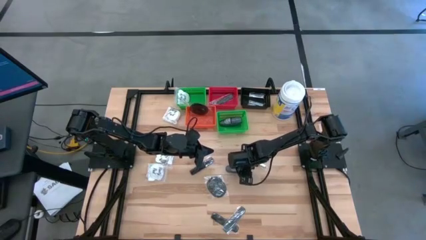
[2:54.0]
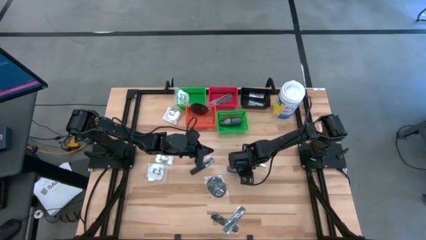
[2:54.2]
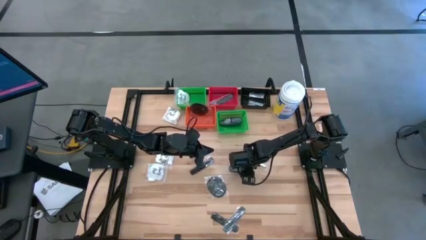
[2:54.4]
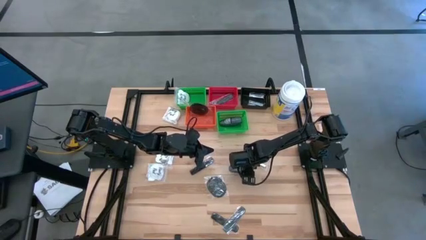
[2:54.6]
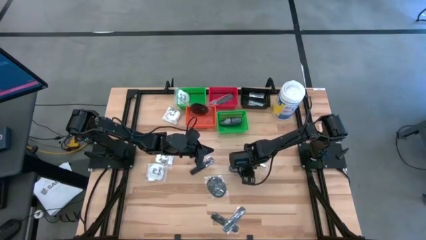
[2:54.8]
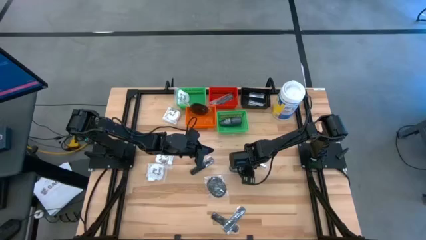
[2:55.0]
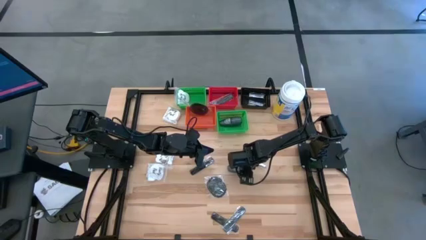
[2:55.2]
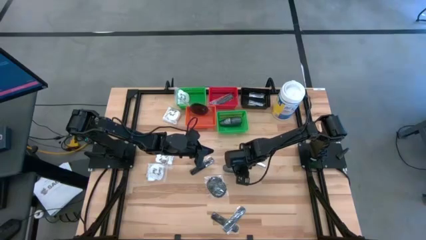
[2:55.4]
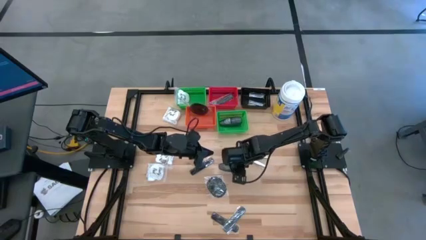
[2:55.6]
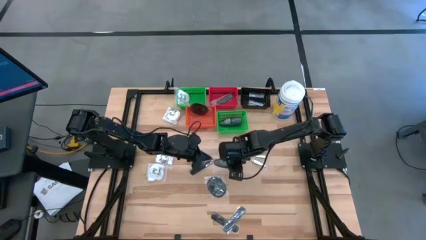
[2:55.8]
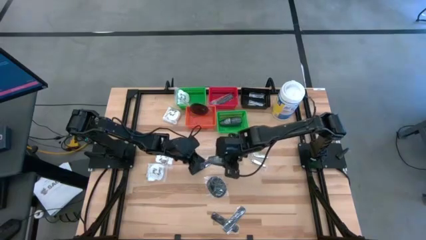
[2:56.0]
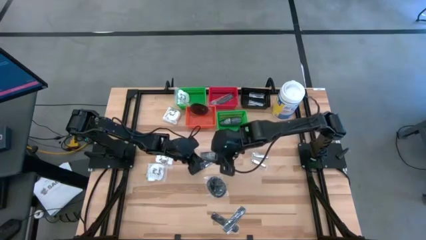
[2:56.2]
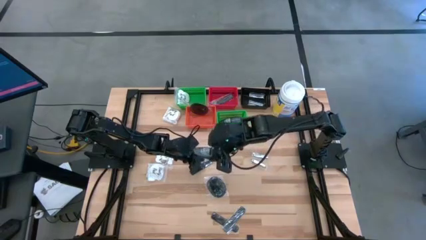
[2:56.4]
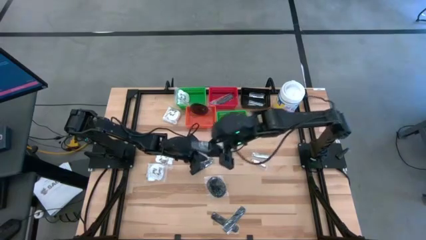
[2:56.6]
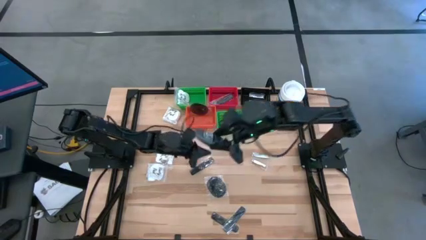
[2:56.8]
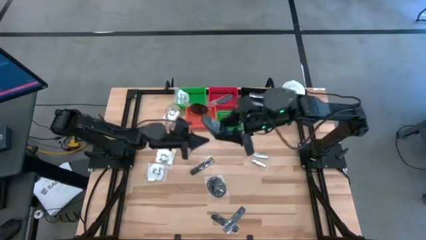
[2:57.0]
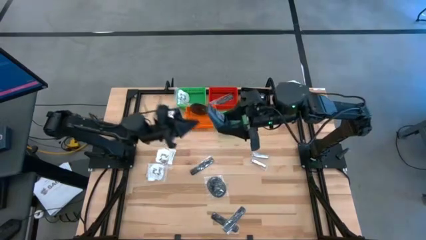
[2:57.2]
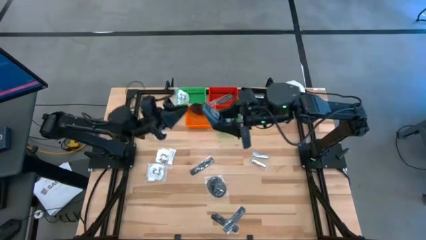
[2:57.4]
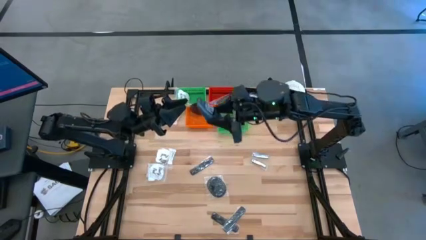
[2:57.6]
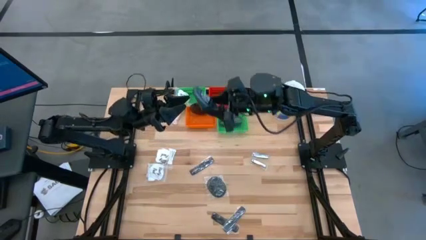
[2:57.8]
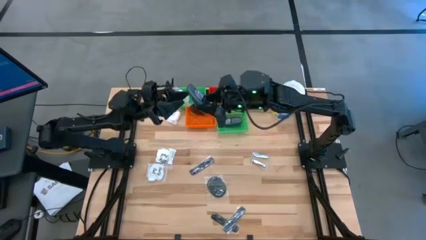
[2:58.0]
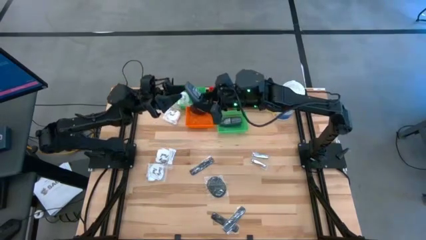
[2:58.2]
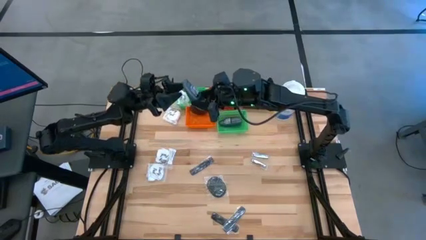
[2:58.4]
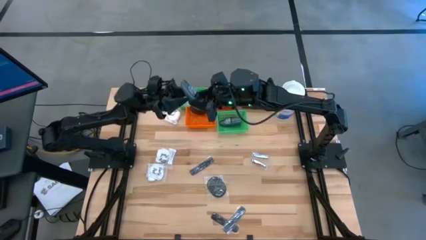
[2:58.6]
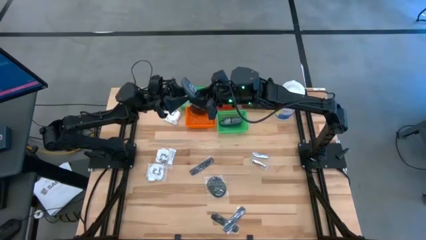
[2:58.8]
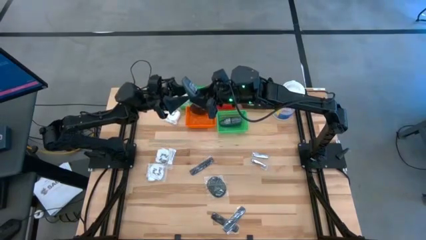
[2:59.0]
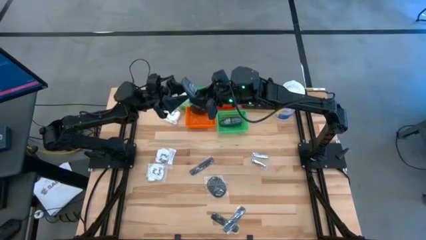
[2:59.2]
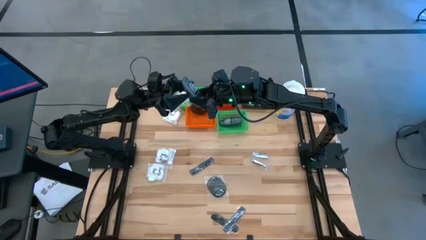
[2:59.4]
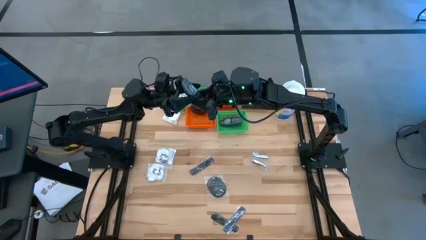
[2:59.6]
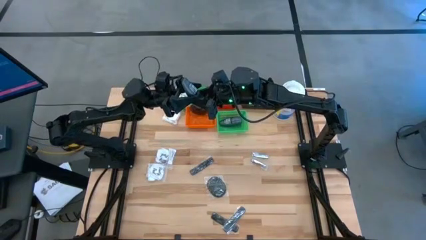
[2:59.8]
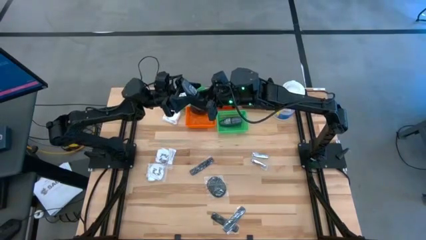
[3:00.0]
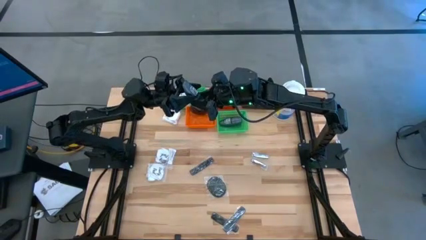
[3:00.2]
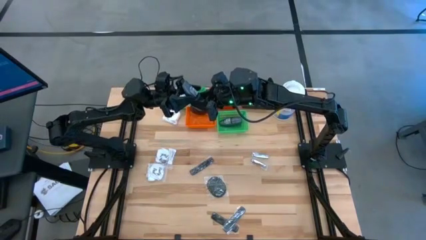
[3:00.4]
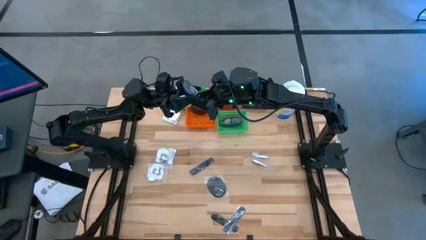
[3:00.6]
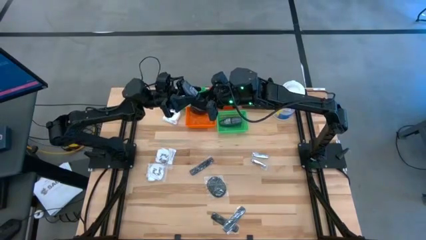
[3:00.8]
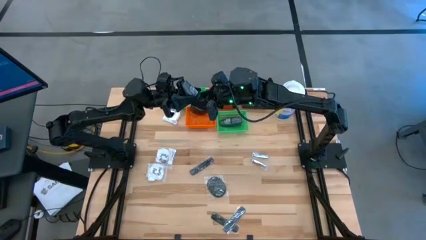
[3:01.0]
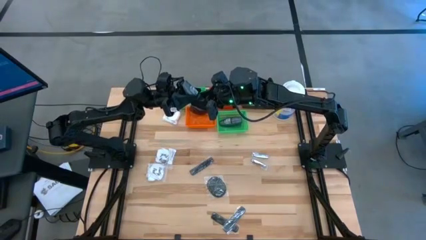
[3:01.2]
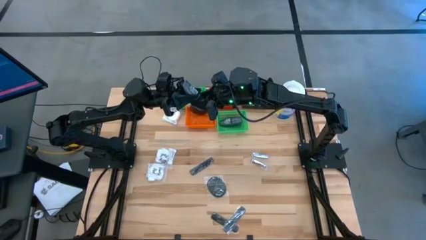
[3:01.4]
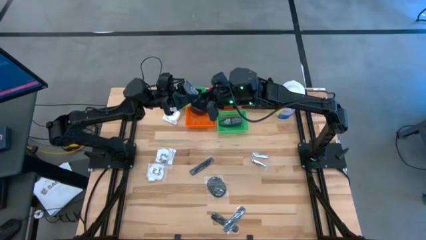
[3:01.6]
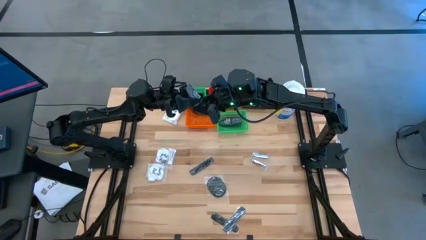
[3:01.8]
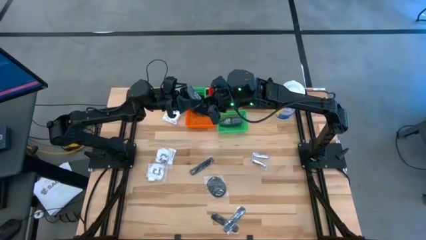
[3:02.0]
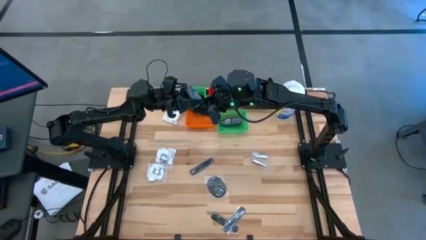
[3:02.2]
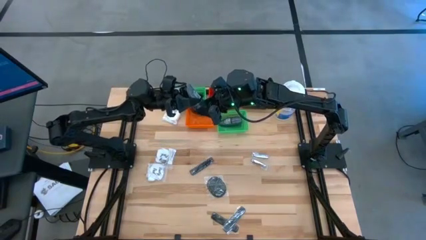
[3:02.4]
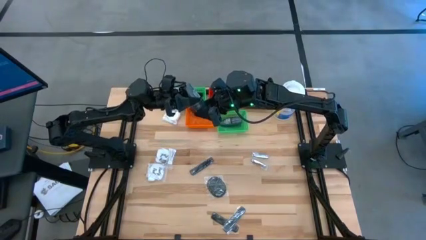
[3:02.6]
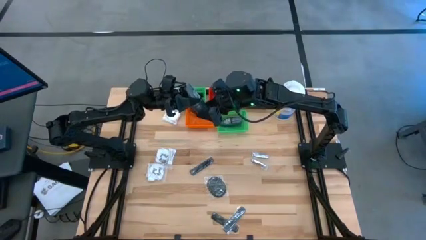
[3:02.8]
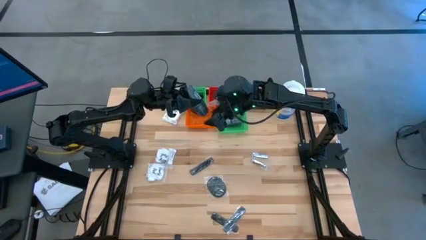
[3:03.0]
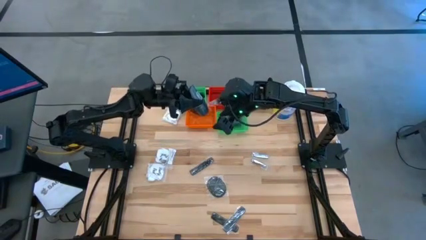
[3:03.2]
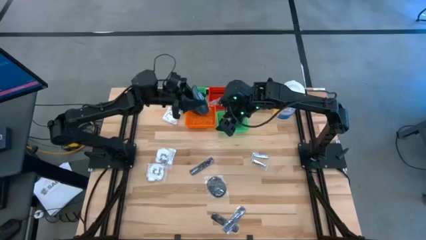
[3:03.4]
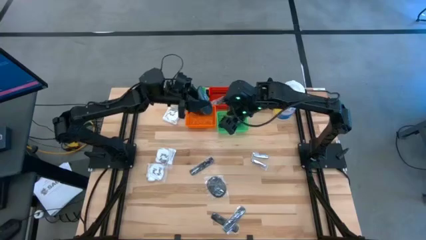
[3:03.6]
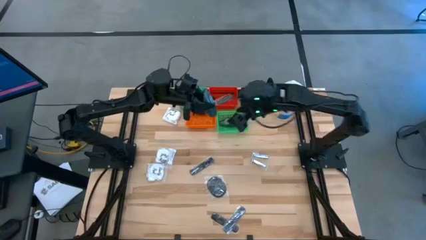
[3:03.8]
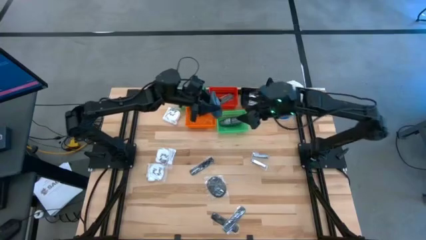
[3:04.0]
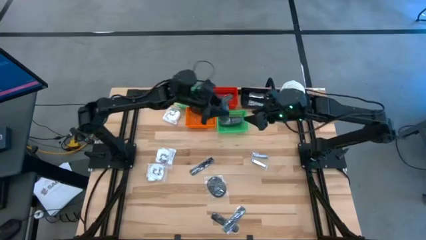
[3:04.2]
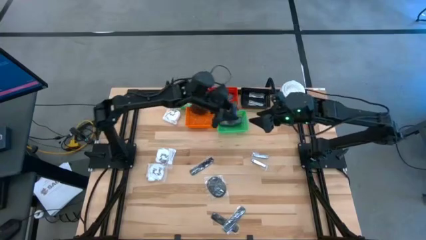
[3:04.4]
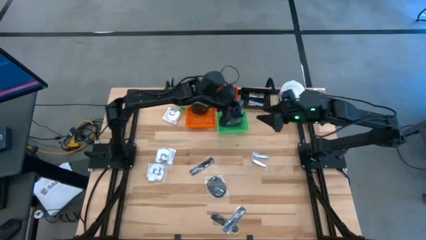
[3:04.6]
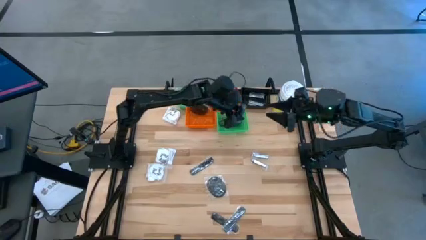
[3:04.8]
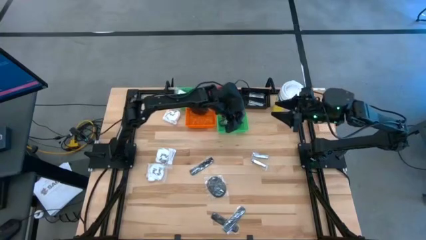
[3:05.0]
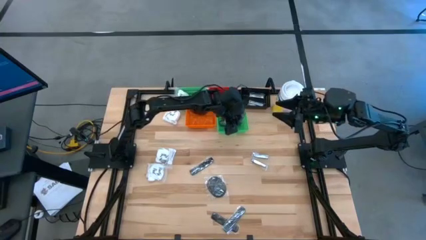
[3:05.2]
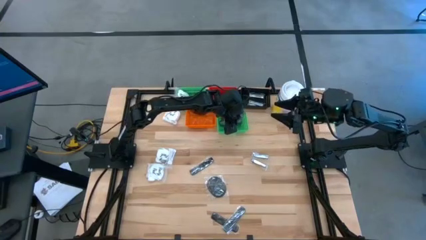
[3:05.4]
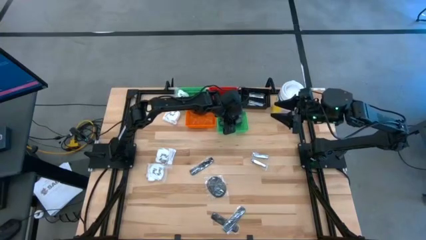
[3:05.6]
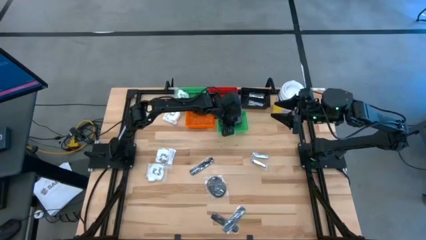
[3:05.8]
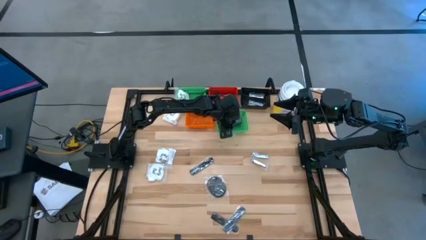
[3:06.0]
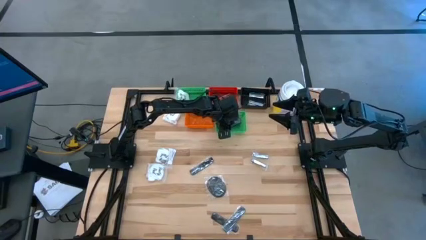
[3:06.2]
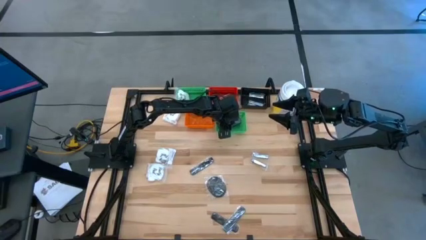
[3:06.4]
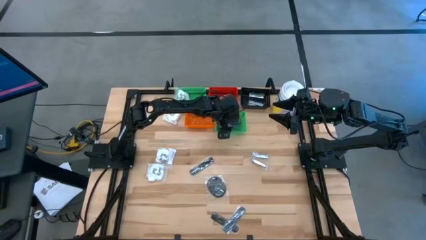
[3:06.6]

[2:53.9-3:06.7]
Task: Pick & Place Travel size toiletries
Put the black deodorant into the green bin

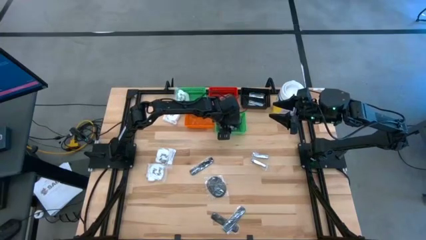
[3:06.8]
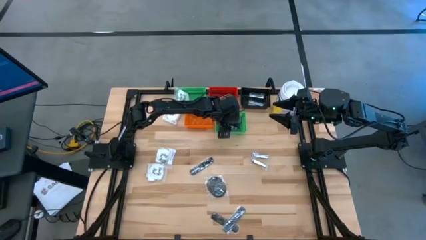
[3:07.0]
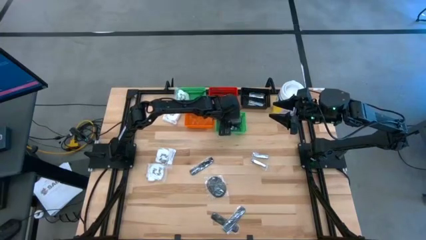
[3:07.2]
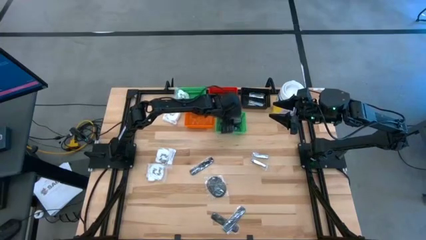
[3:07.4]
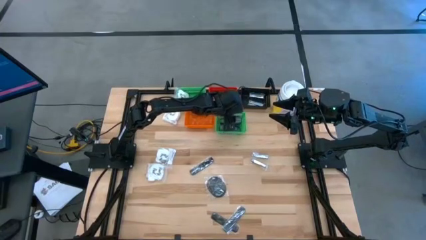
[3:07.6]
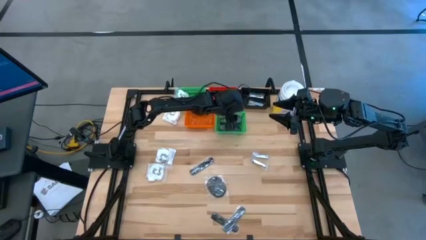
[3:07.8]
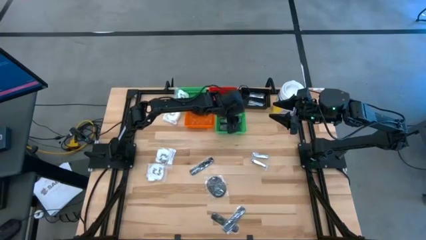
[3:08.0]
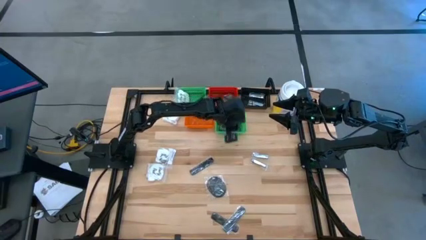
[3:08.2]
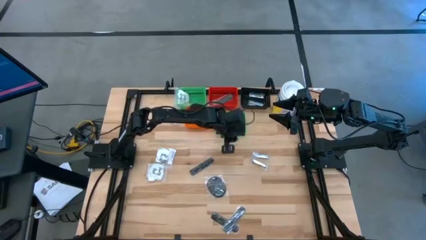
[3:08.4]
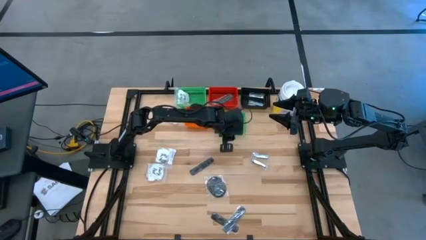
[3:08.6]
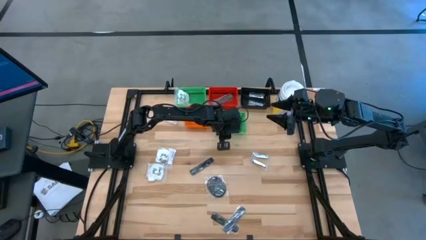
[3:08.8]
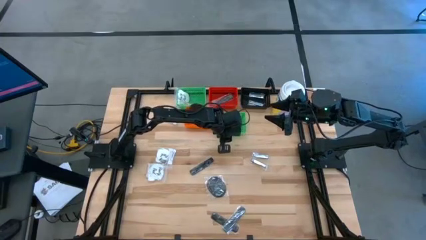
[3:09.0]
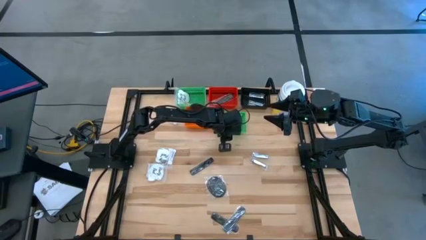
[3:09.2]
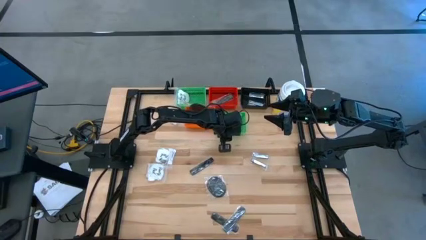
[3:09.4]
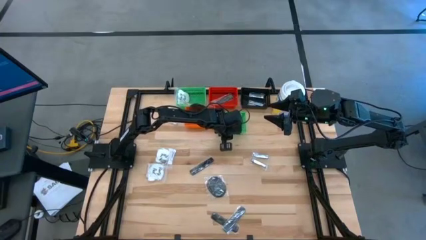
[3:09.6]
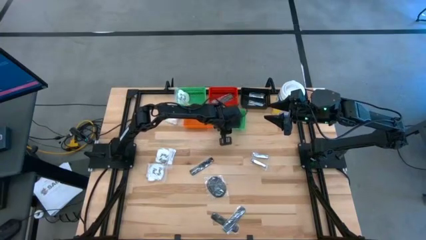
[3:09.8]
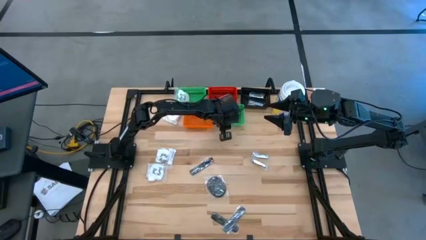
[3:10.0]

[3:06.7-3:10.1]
Adjust the green bin

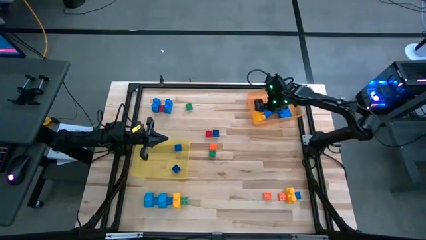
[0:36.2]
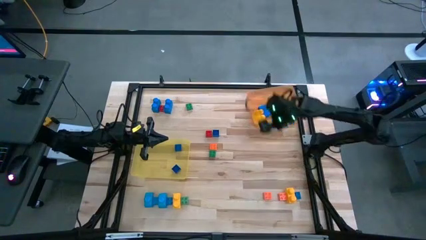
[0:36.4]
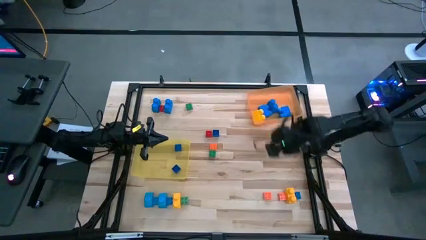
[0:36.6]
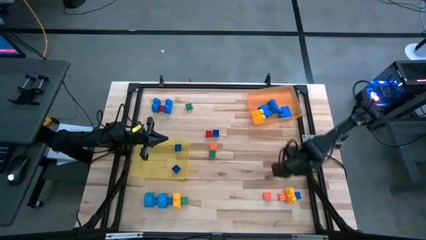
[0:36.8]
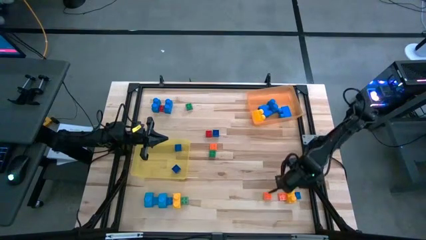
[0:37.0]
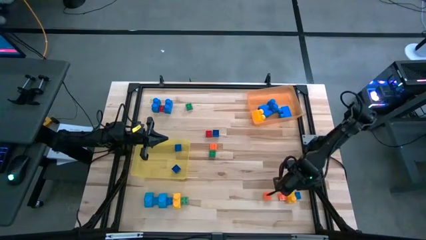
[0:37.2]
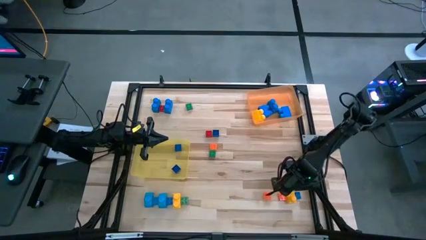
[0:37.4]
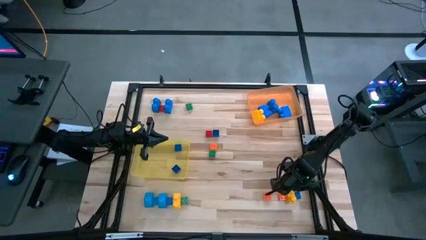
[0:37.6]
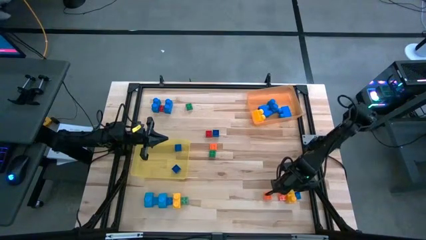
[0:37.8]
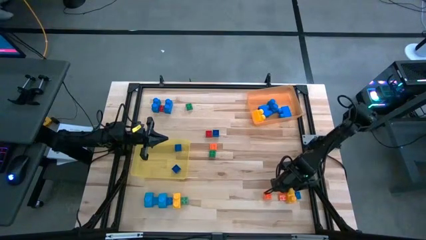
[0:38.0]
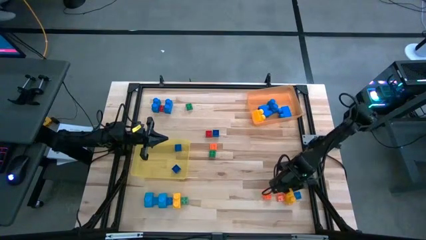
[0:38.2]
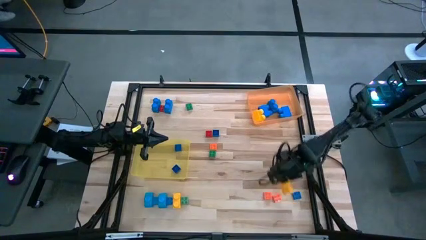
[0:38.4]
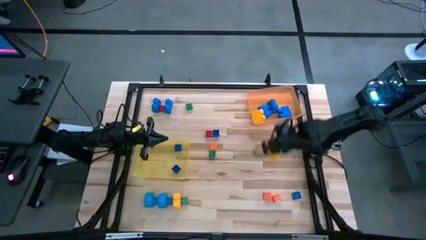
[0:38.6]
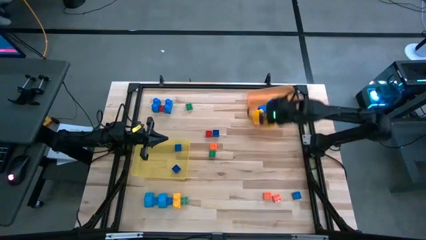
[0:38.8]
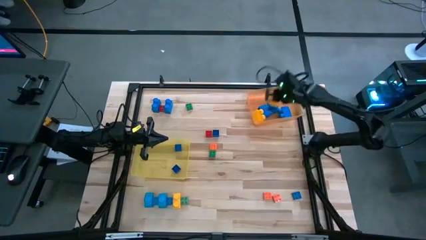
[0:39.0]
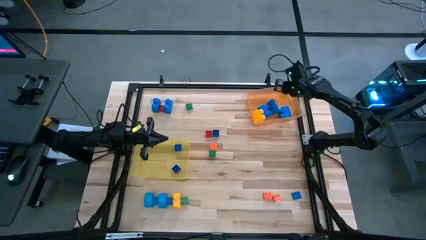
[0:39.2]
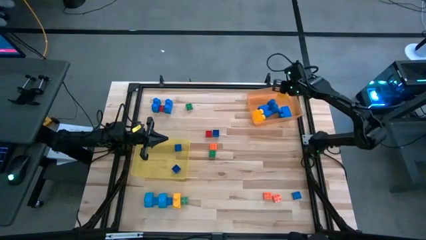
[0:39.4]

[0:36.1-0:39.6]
Task: Sort blocks by size
Put the large yellow 2 stud game piece into the orange bin
